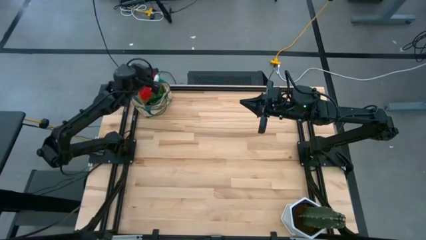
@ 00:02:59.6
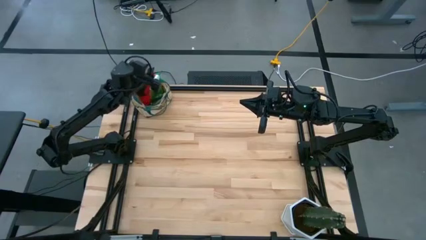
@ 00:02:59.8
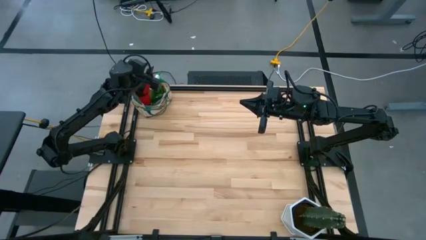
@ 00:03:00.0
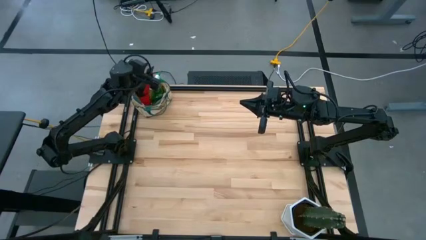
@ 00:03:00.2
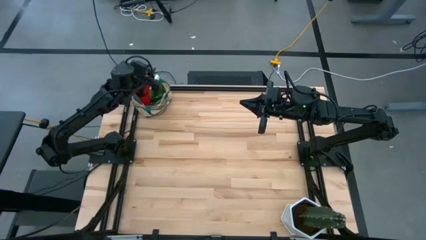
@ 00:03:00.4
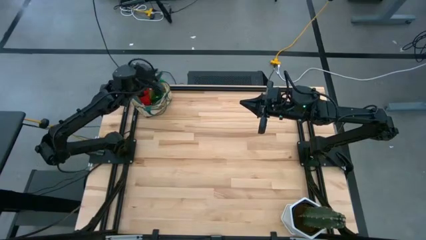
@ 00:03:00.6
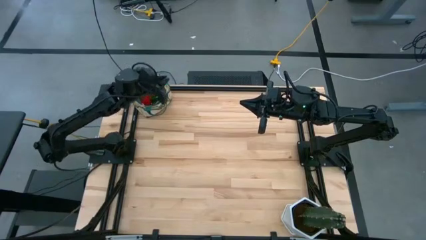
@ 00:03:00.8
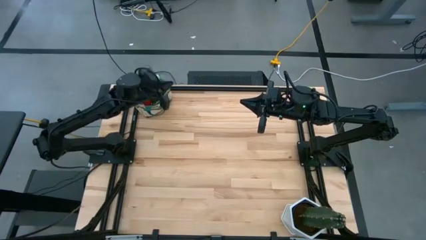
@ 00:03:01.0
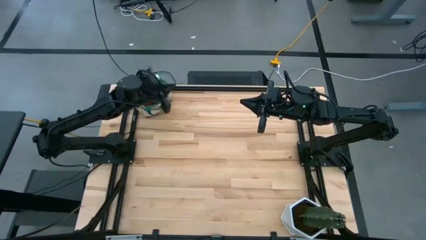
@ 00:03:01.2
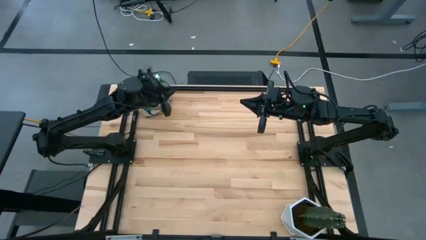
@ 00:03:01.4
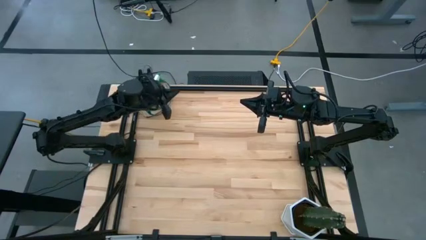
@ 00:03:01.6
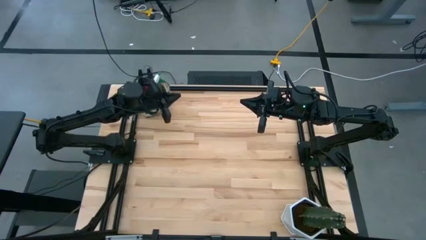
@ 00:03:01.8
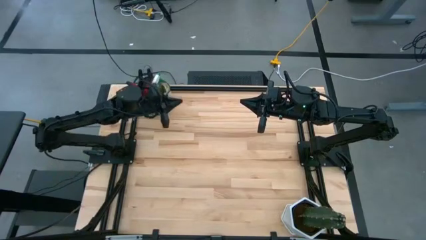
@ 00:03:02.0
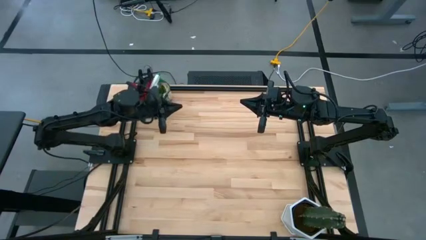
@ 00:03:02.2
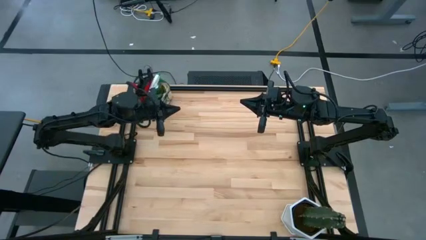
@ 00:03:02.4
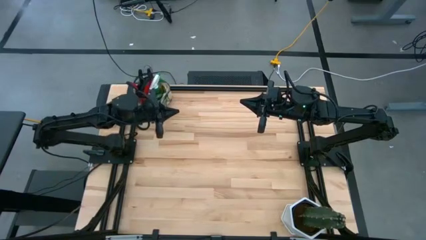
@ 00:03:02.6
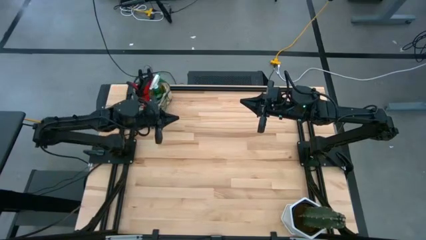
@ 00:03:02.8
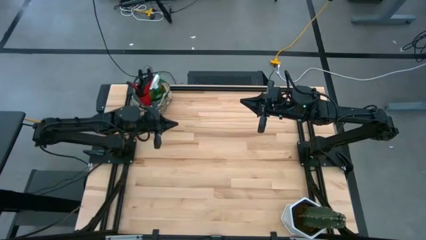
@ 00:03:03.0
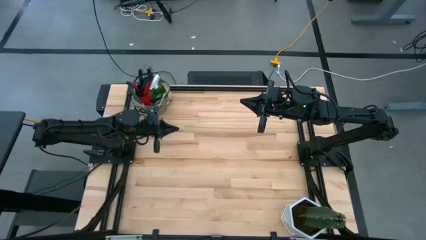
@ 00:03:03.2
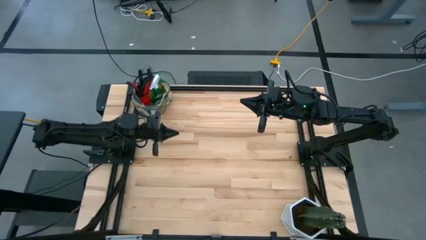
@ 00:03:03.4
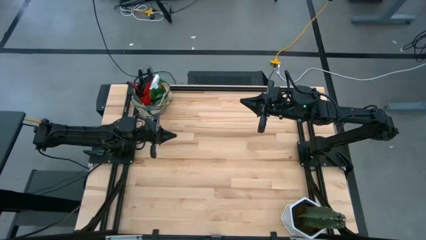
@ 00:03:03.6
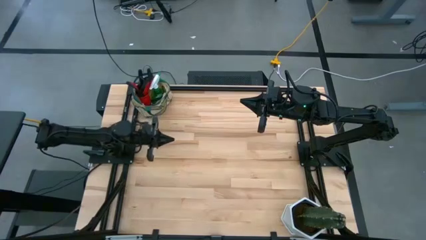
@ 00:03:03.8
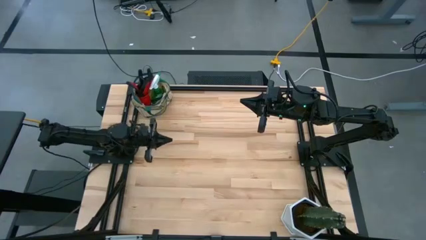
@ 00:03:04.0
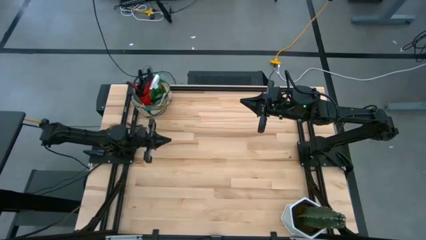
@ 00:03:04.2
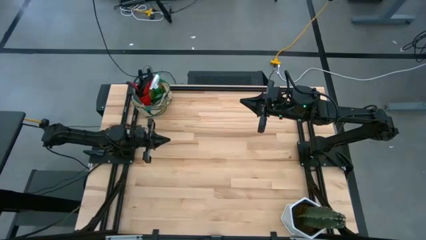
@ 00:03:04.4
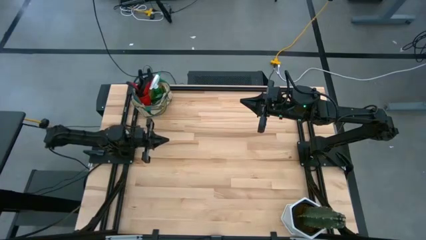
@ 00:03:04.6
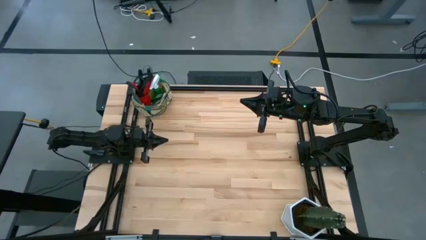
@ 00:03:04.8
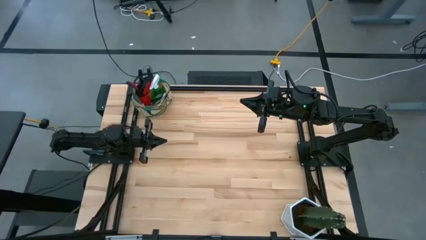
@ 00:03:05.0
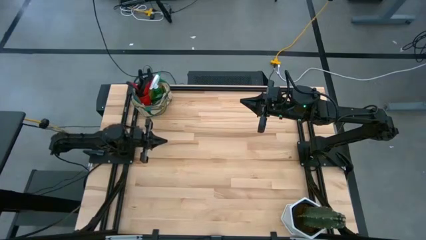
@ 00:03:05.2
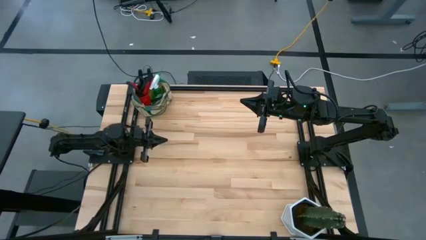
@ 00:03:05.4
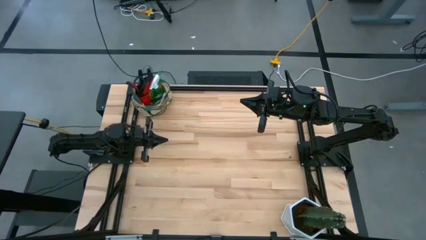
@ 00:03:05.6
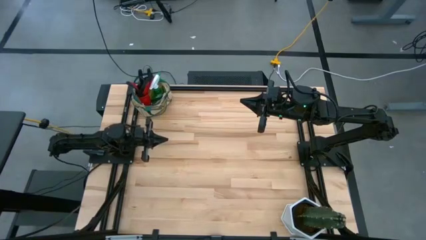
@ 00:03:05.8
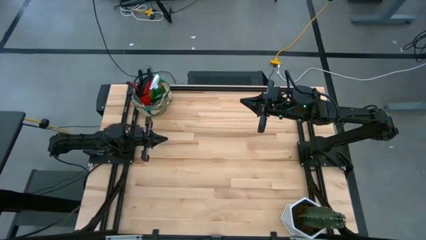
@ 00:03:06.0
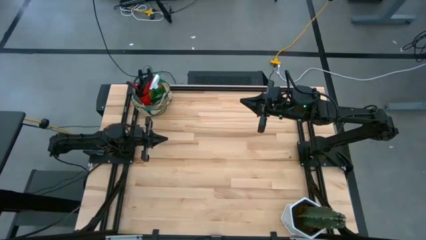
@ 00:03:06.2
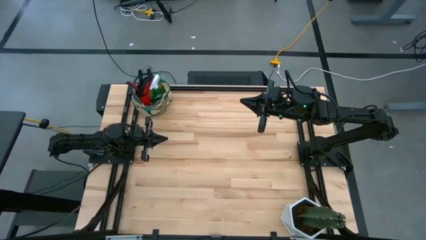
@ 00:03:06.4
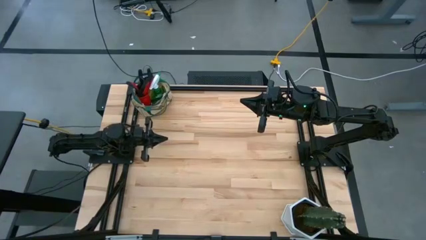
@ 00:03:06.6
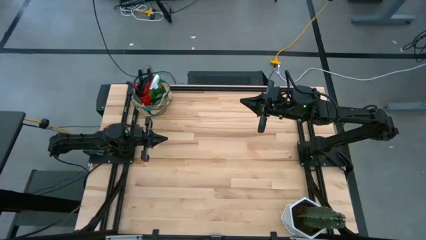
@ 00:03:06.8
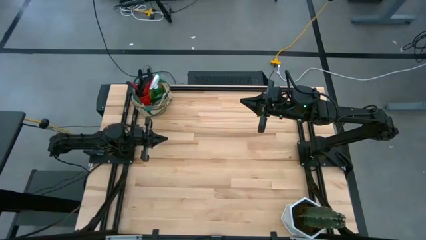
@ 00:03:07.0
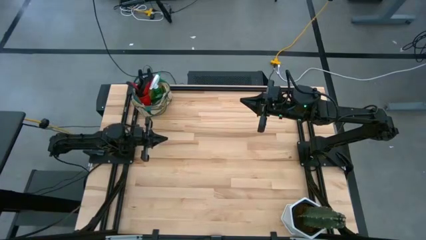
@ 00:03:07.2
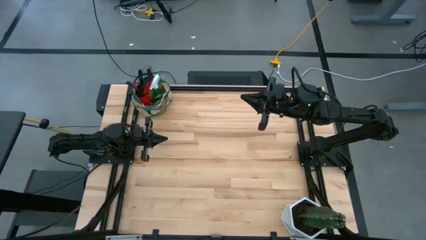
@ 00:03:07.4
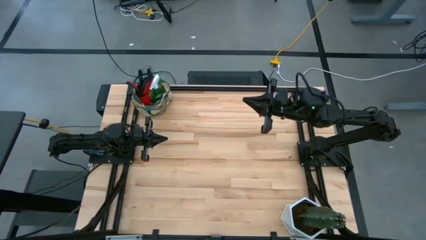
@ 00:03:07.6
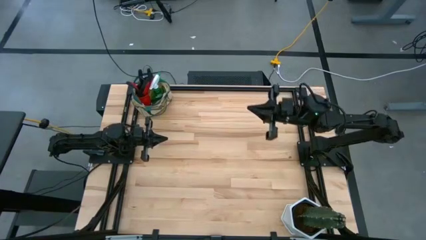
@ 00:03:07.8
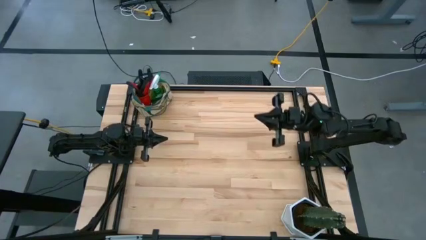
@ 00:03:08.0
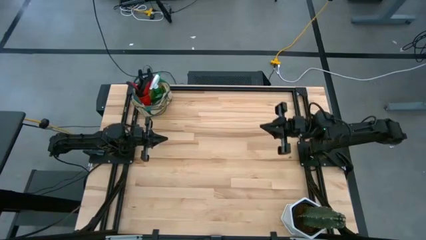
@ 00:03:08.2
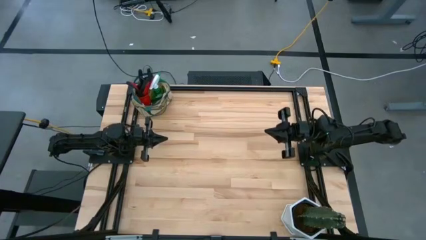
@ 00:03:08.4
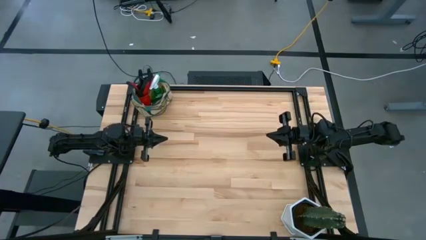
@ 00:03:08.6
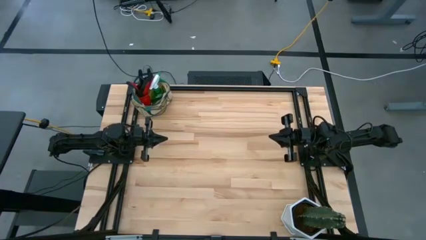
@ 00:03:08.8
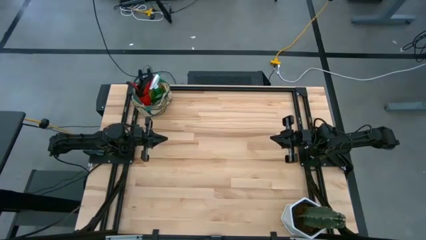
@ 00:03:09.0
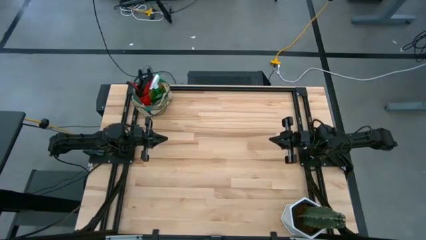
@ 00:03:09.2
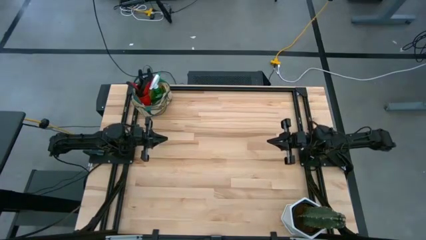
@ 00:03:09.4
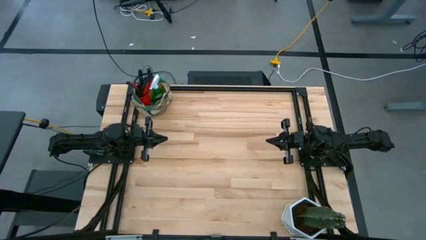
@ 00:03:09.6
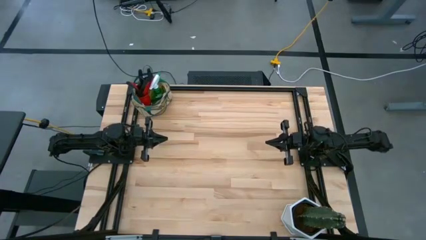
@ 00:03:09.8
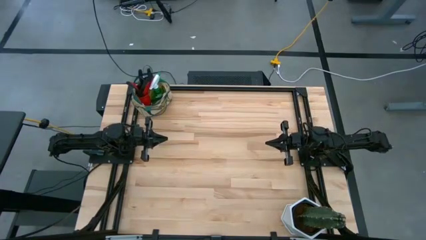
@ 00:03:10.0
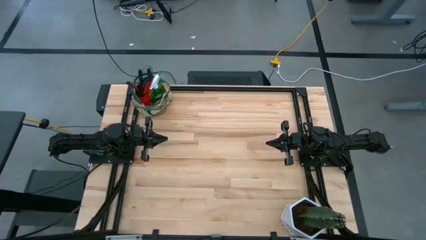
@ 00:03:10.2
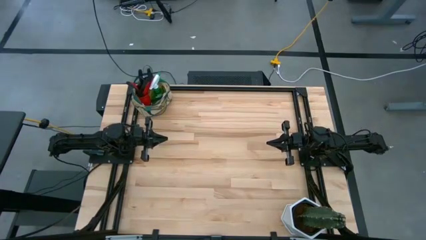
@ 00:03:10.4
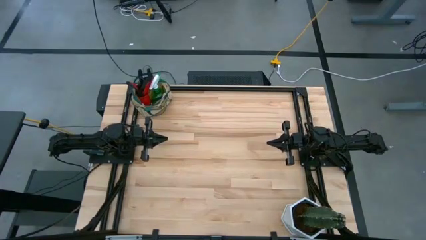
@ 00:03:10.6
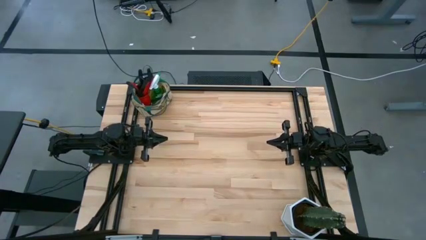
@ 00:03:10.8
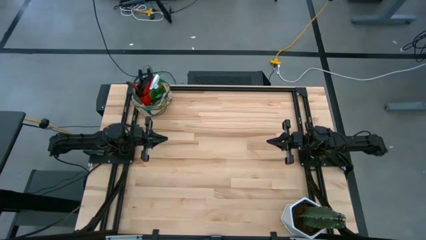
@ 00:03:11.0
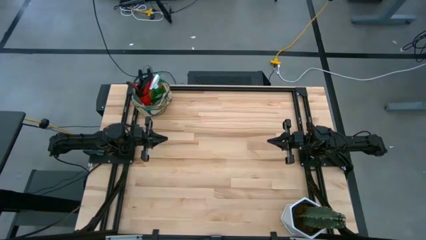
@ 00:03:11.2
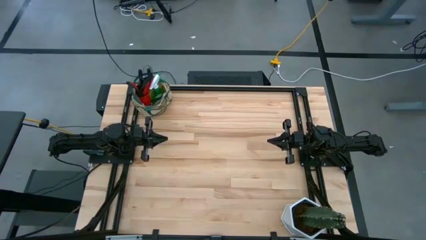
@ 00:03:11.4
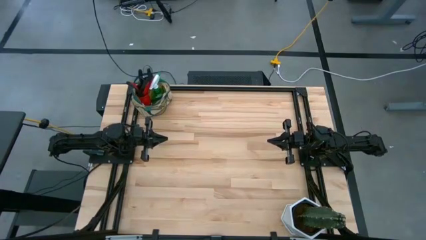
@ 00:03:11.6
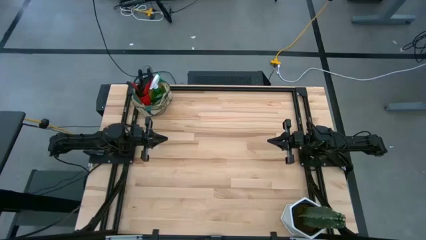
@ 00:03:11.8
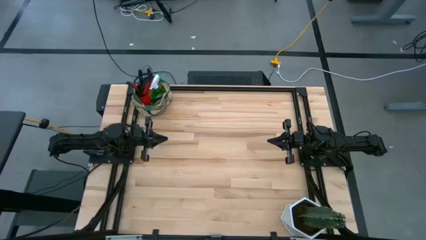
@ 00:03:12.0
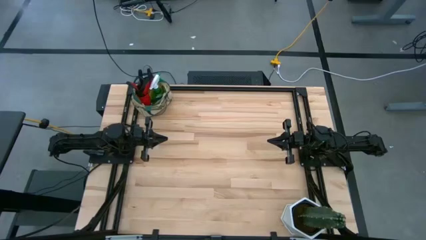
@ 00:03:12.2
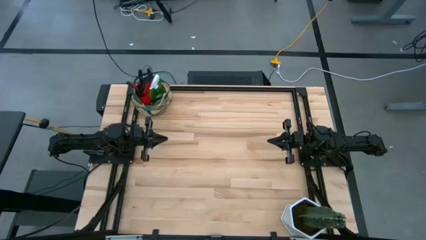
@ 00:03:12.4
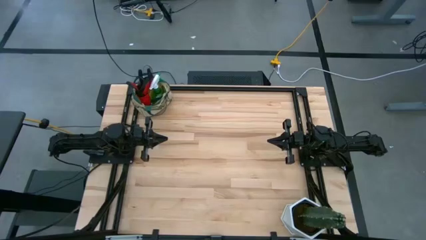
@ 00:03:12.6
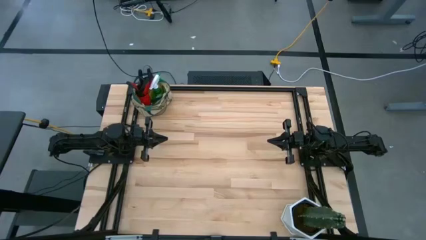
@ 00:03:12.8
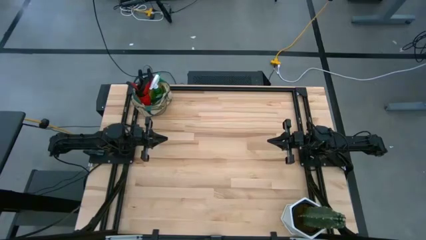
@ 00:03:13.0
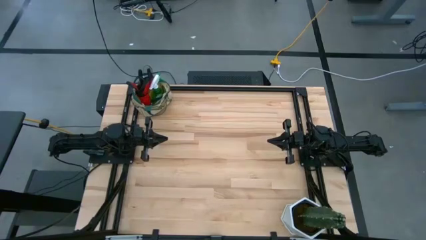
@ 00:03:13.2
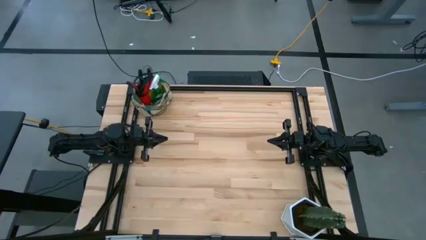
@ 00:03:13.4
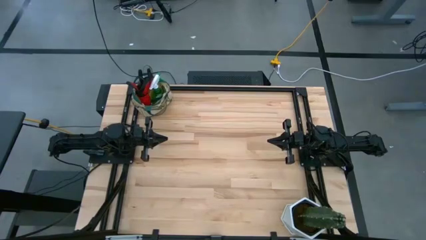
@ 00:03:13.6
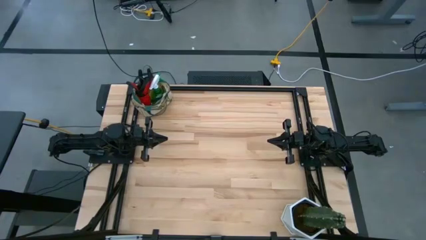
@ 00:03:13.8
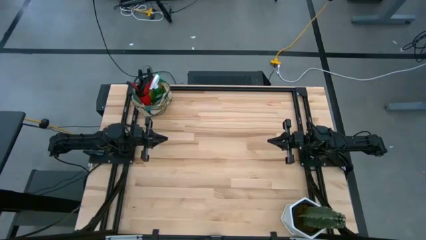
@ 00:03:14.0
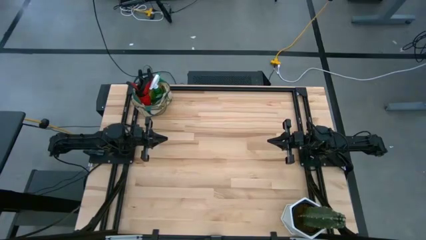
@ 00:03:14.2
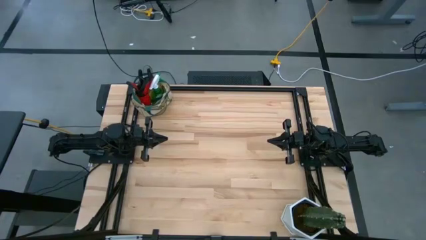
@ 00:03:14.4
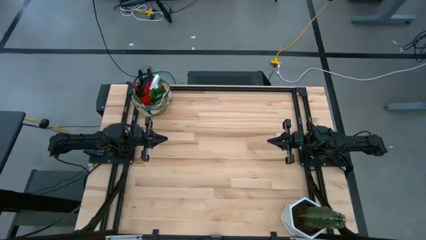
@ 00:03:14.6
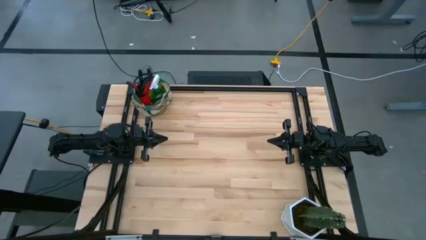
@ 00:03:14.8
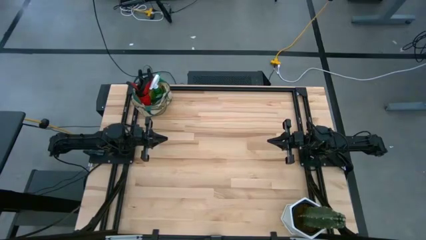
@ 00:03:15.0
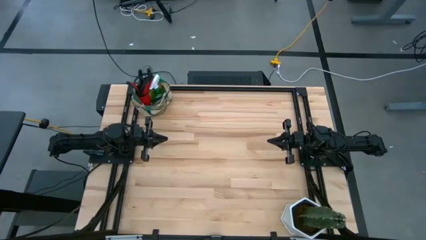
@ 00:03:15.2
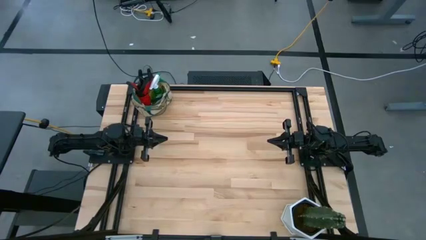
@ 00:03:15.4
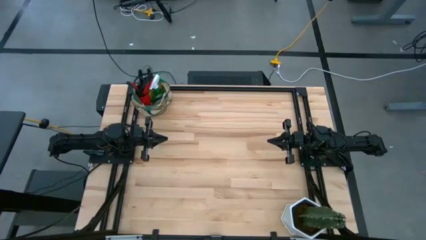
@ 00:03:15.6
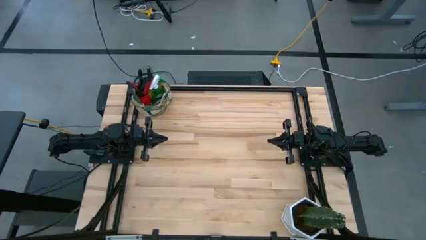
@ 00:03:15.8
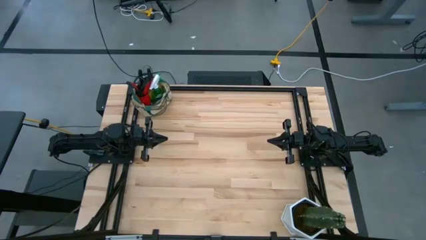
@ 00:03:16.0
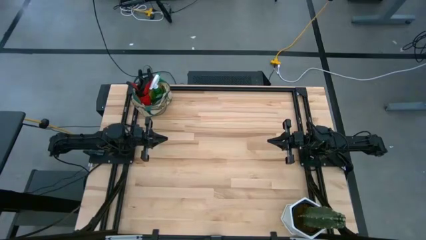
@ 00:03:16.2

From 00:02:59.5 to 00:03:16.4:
Task: Pick & Place Garden tools in Gardening bag
Return to Home Position
